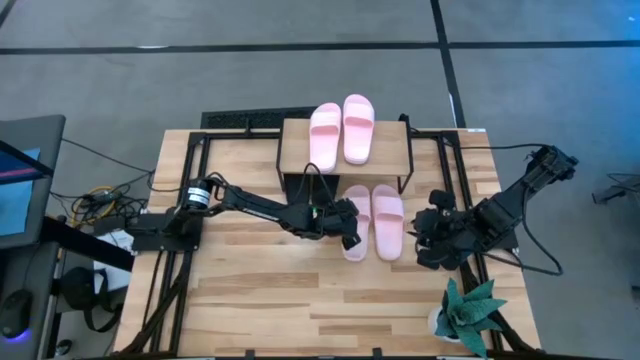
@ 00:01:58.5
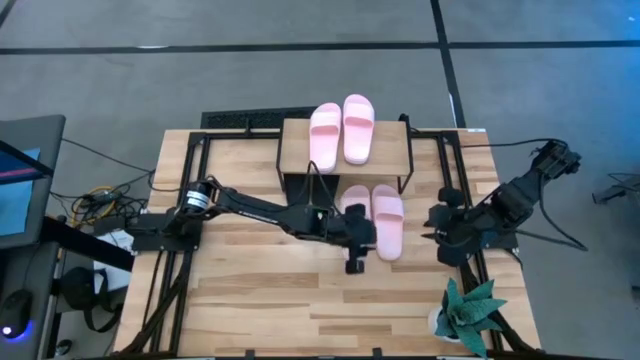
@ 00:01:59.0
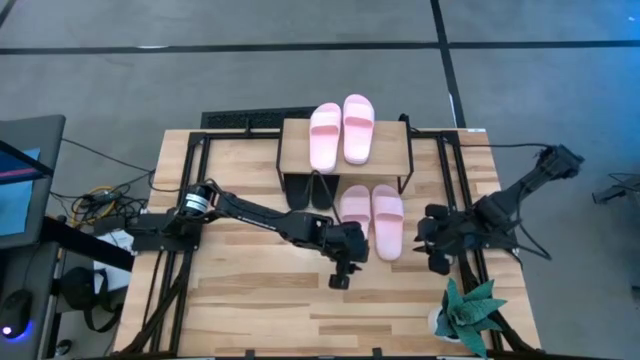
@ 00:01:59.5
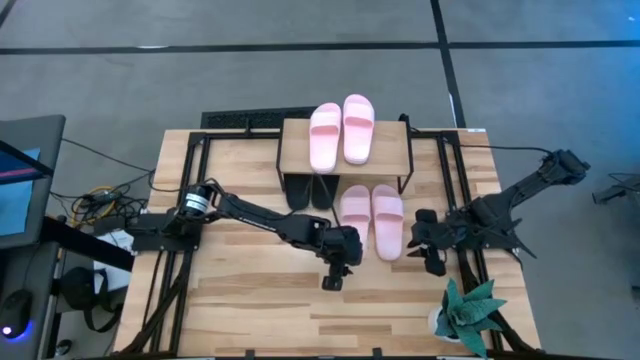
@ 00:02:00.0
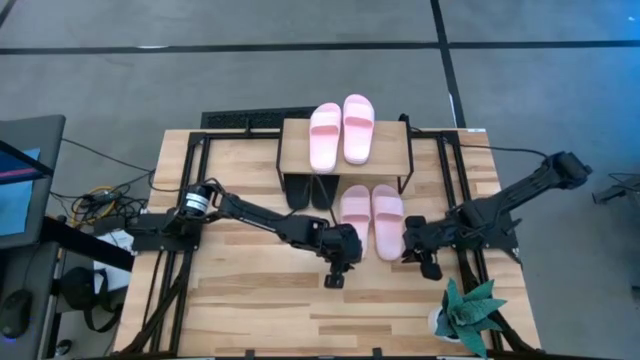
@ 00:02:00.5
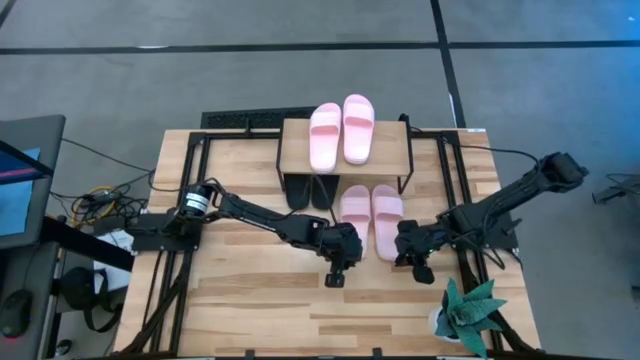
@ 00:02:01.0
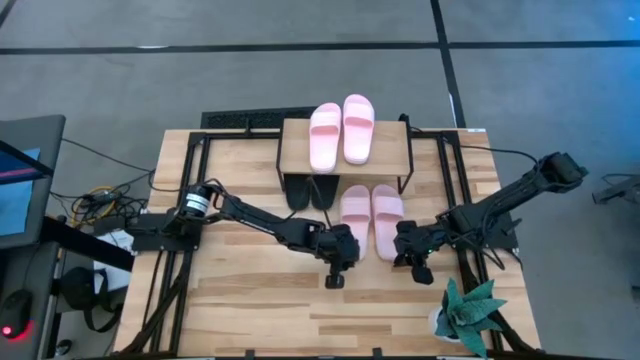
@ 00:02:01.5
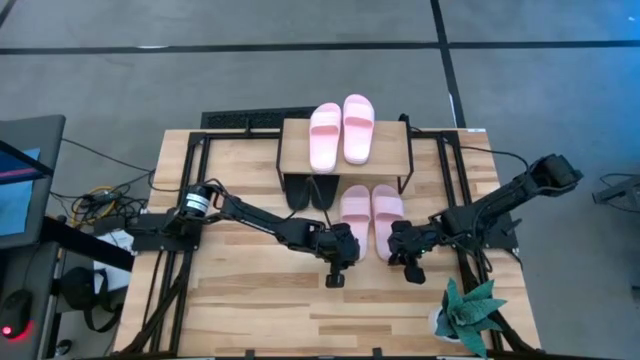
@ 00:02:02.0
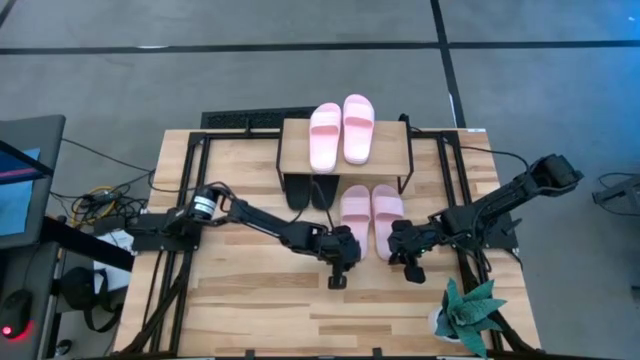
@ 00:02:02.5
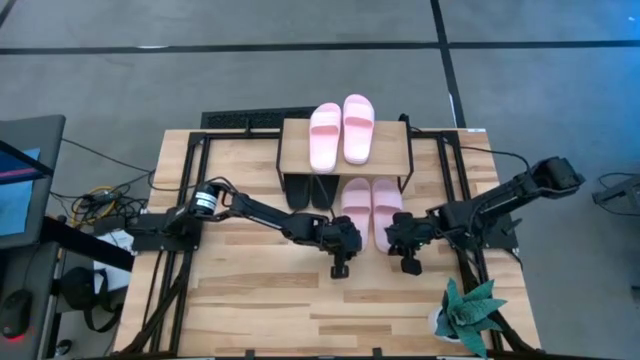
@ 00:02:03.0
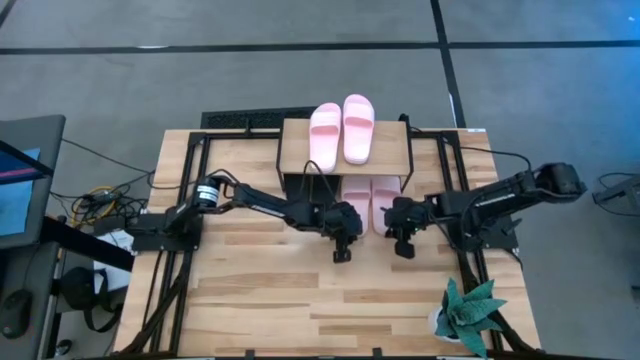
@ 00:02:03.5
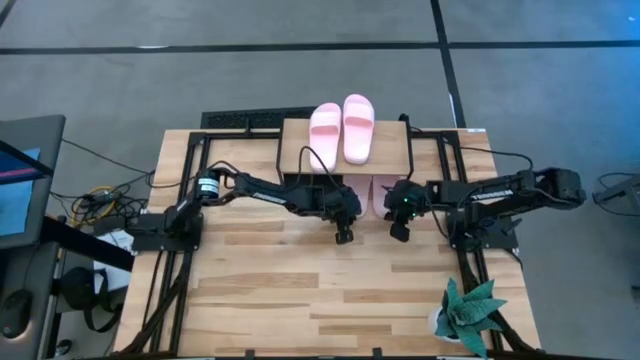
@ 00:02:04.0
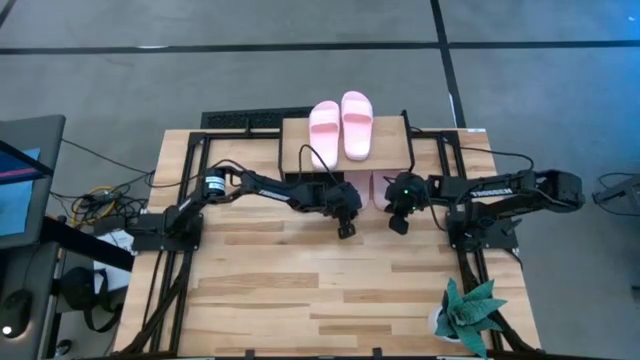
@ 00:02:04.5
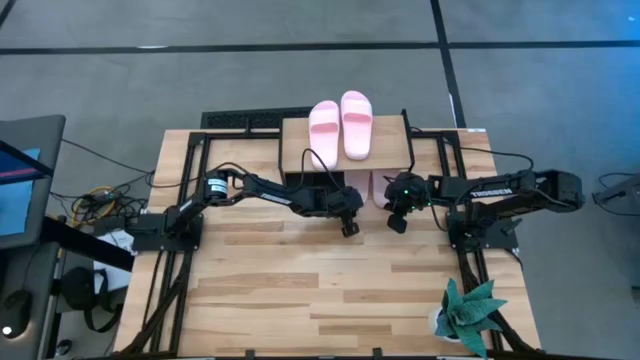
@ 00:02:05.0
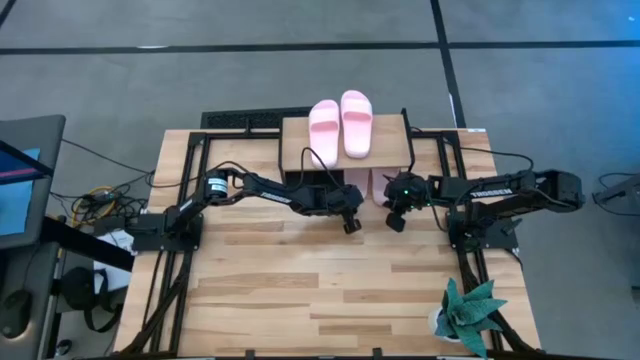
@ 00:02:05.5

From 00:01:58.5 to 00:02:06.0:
Task: Pick and place slides into the shelf
Adjust the pink slides under the shelf

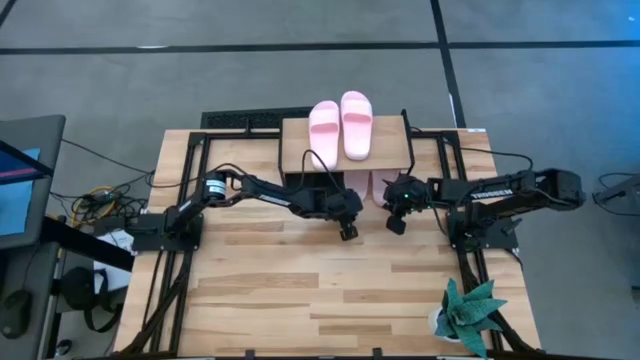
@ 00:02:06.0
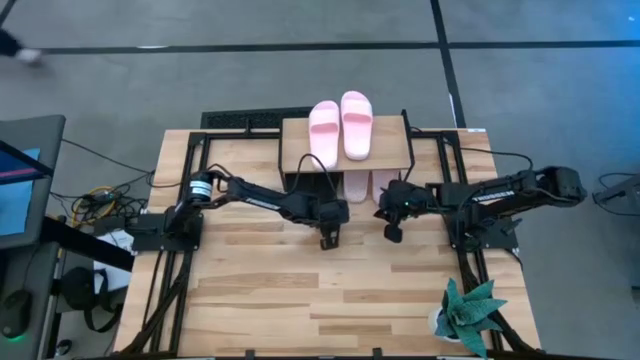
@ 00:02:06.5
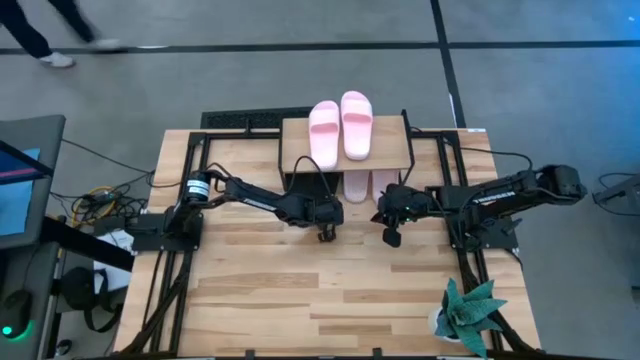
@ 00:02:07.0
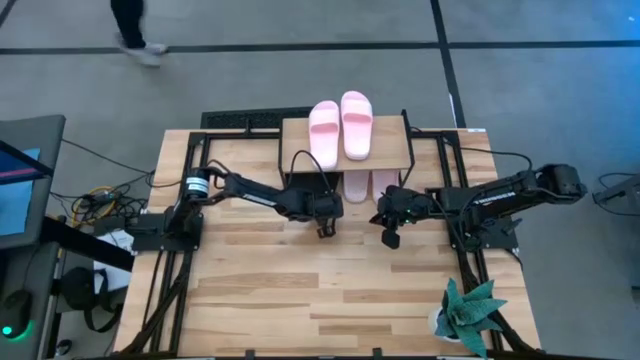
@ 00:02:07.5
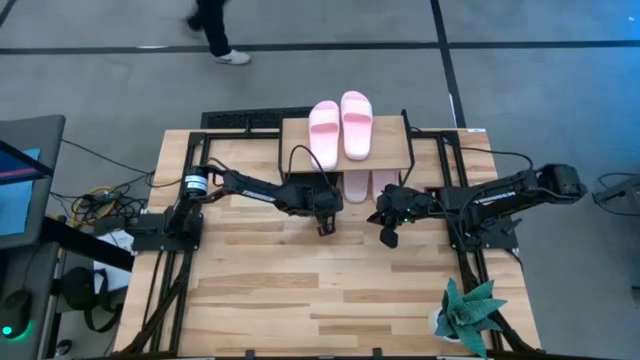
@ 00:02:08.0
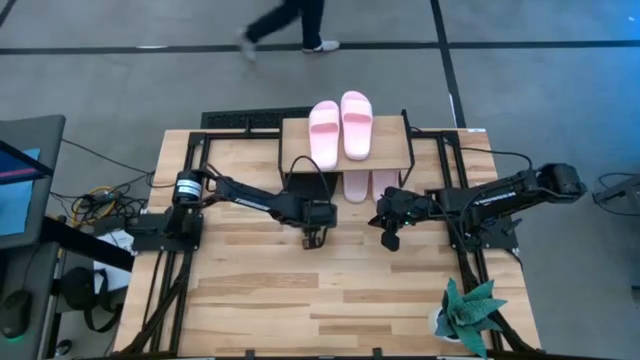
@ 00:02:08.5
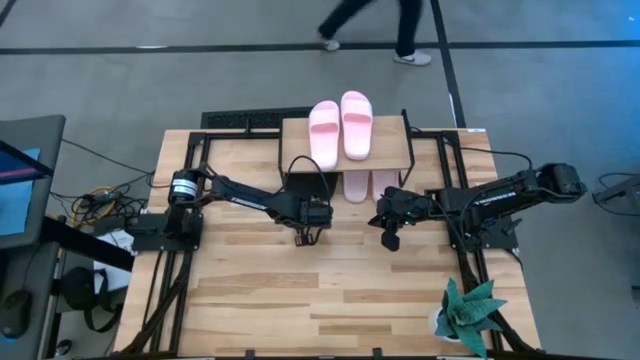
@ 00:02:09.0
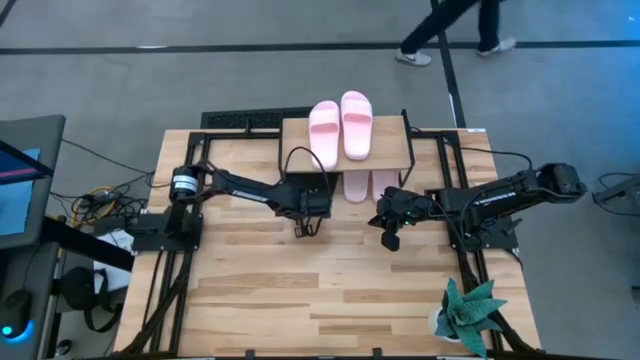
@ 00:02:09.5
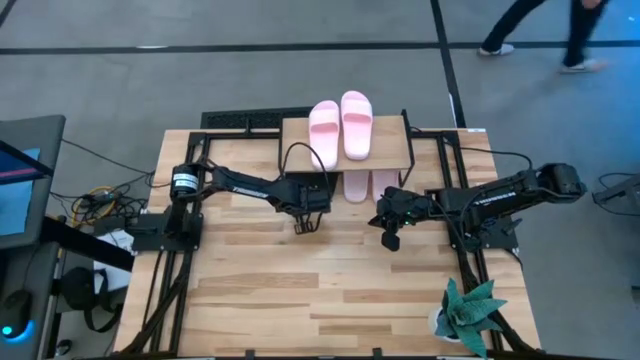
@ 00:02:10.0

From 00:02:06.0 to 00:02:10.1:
Adjust the black slides under the shelf

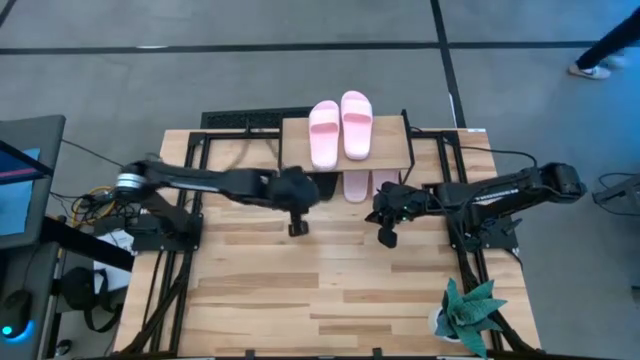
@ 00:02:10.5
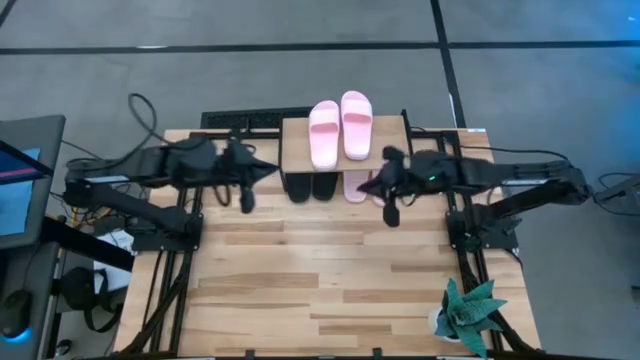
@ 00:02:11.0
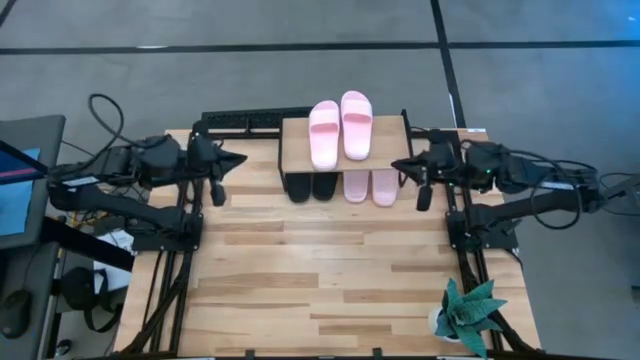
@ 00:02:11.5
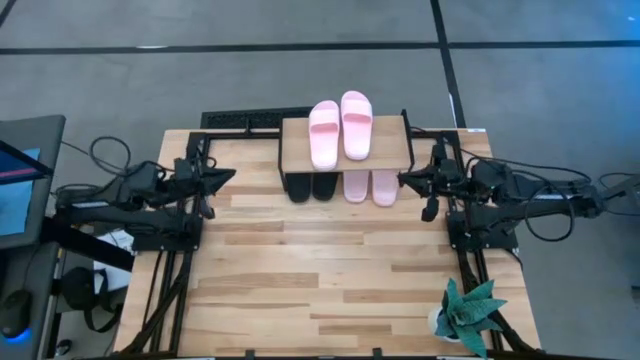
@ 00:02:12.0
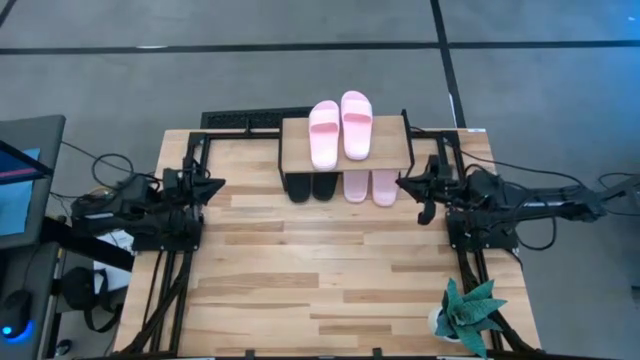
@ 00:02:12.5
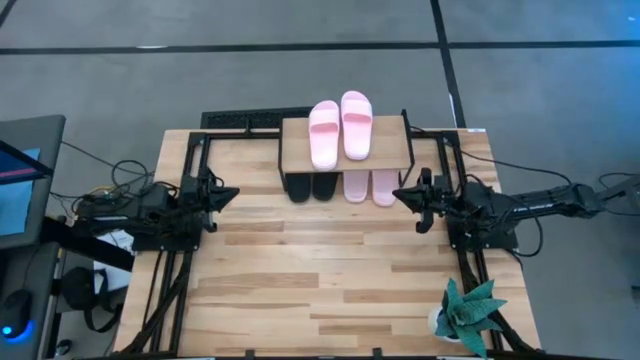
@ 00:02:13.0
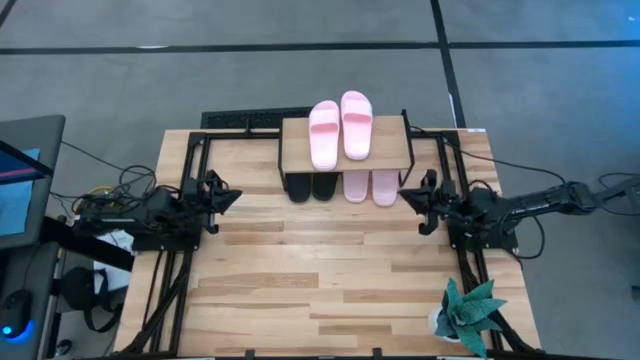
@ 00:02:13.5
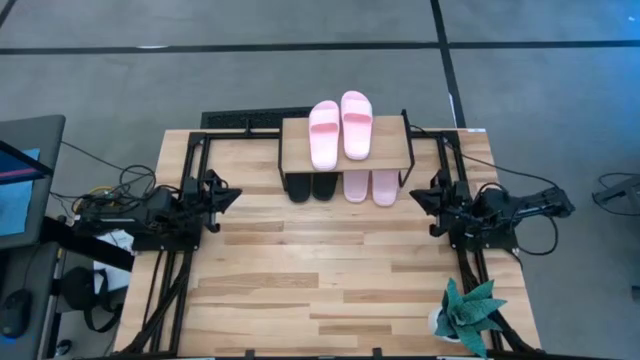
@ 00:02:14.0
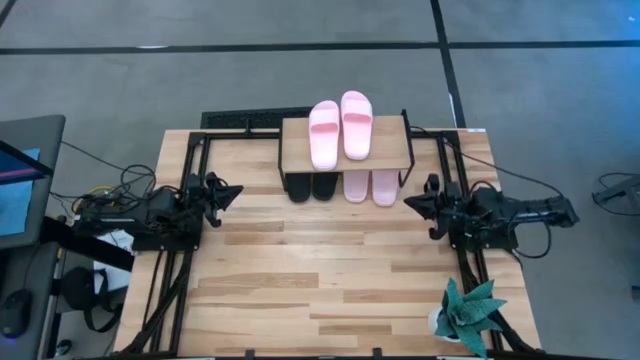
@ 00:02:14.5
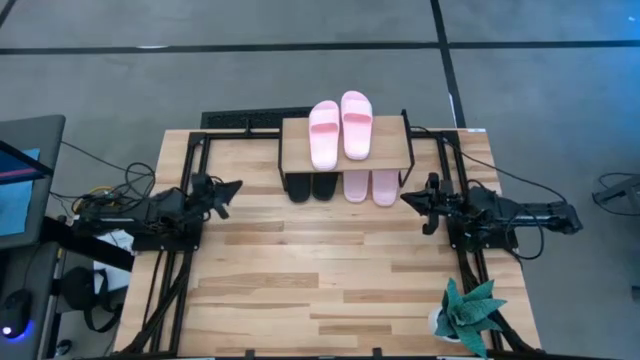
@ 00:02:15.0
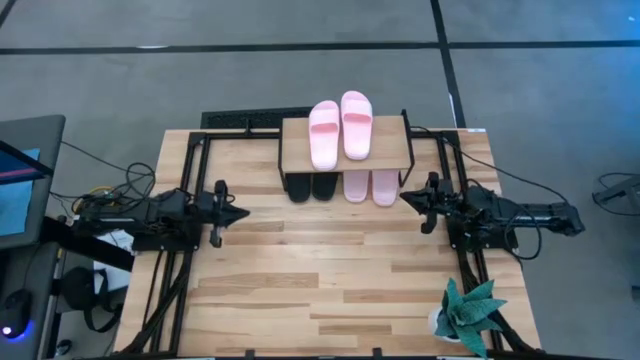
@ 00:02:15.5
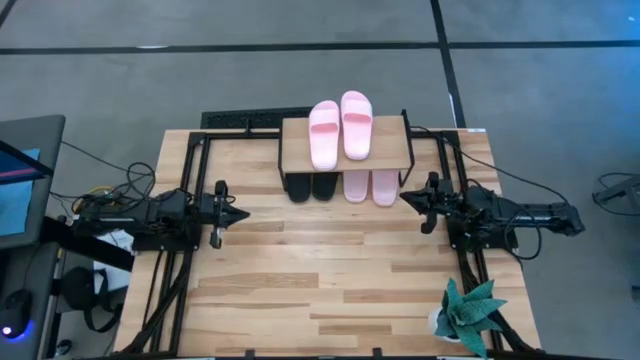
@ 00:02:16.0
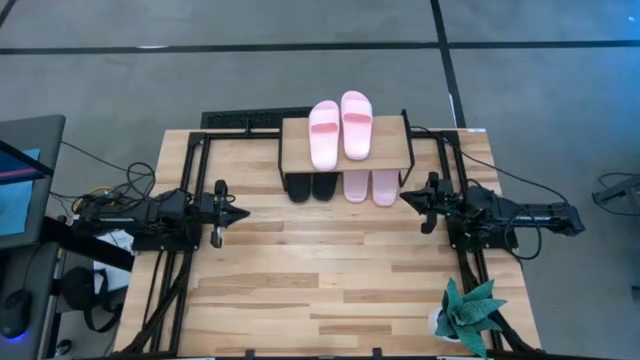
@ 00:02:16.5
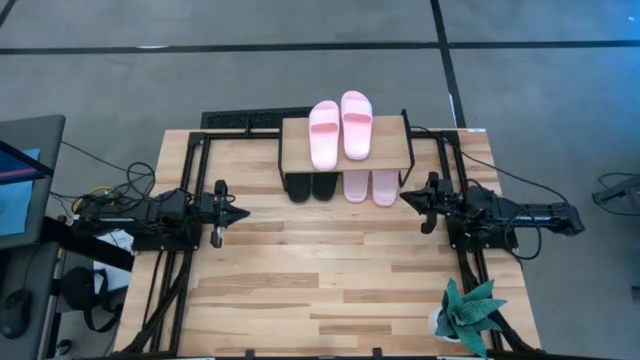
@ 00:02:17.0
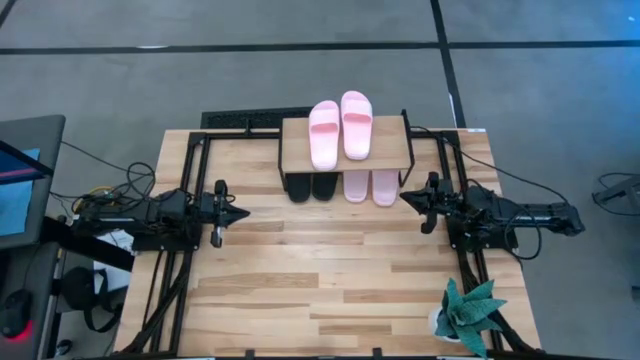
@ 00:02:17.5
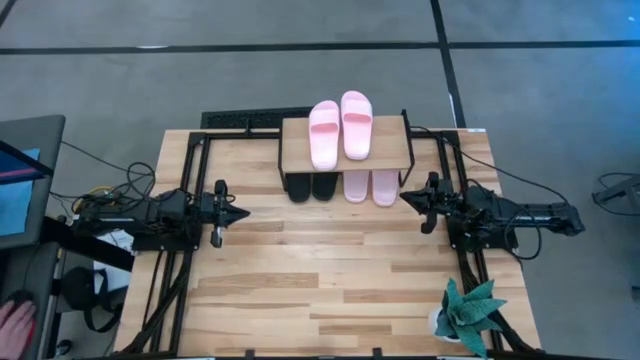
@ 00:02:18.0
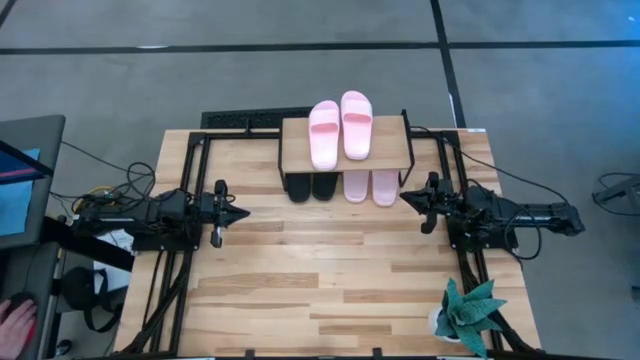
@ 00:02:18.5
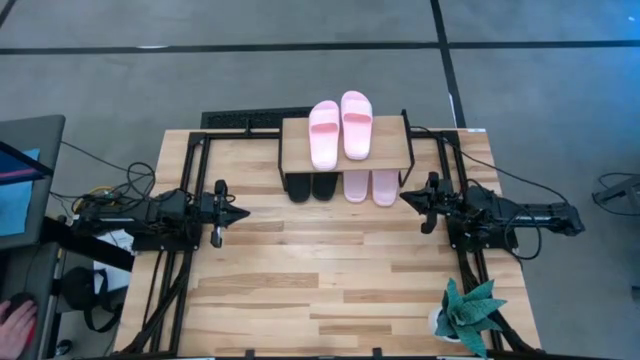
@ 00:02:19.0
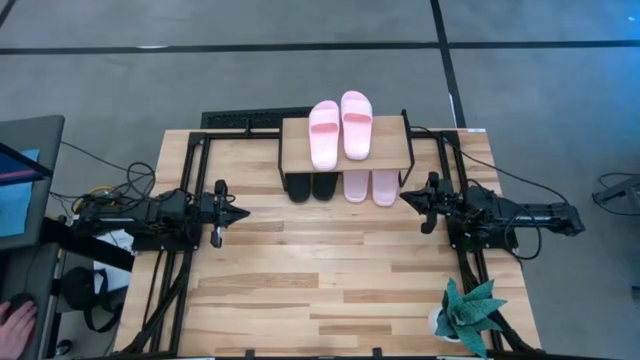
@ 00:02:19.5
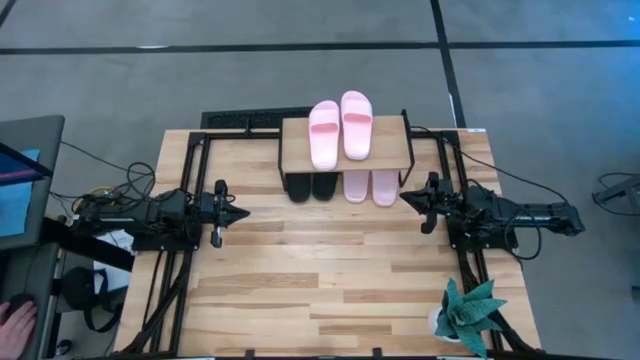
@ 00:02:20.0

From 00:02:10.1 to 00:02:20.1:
Return to Home Position
